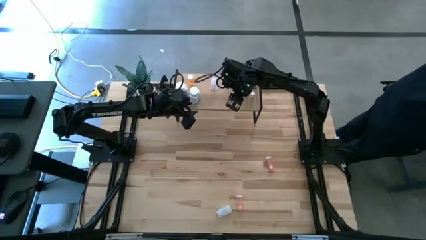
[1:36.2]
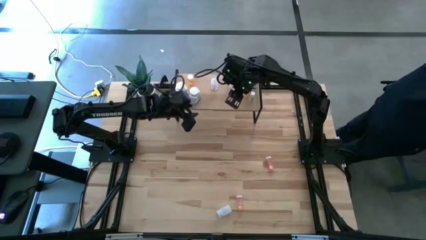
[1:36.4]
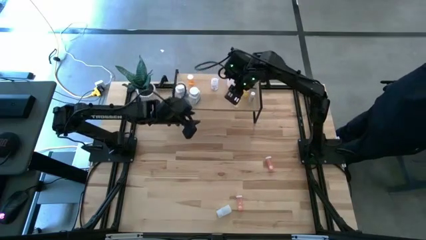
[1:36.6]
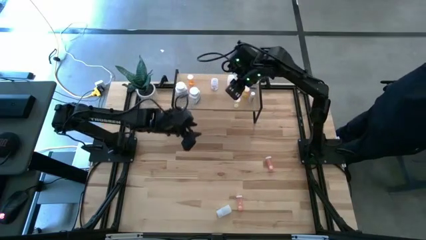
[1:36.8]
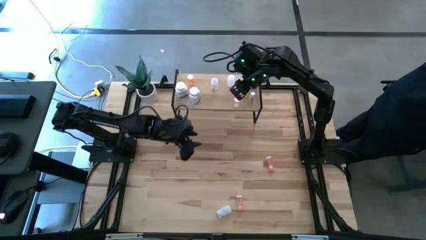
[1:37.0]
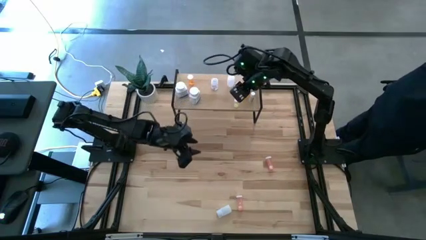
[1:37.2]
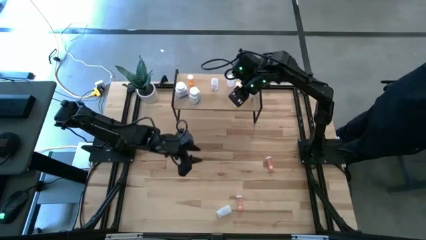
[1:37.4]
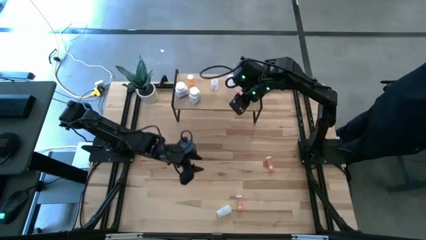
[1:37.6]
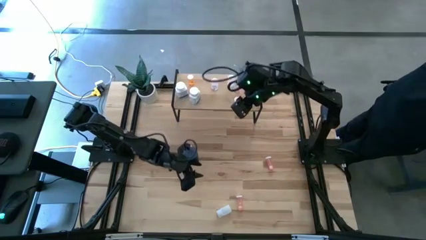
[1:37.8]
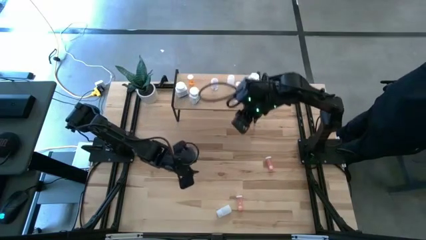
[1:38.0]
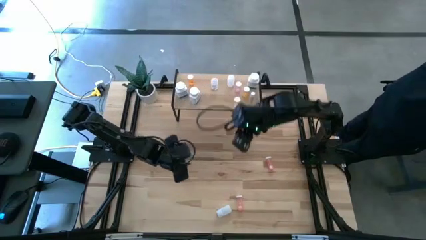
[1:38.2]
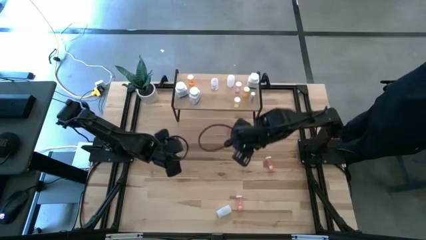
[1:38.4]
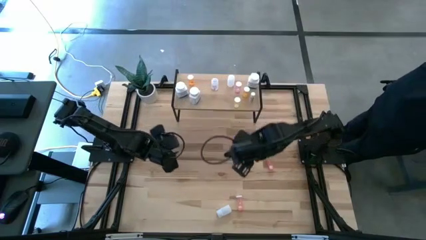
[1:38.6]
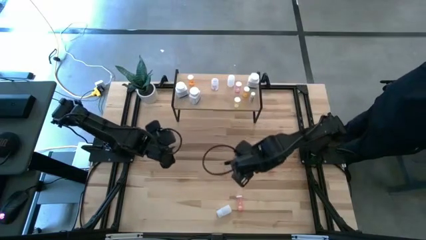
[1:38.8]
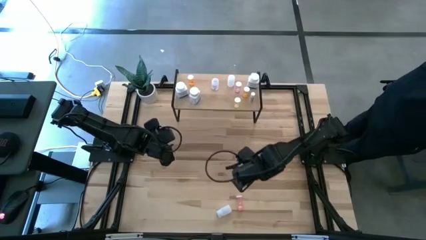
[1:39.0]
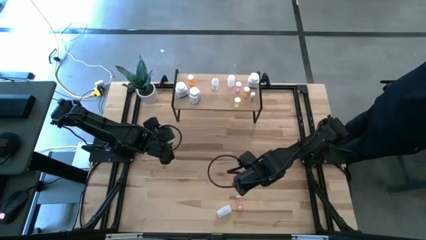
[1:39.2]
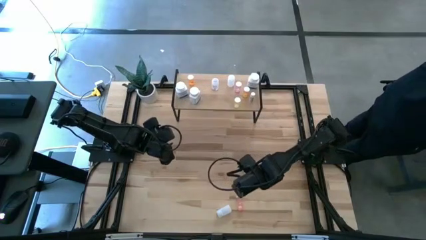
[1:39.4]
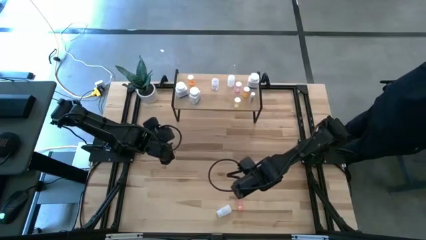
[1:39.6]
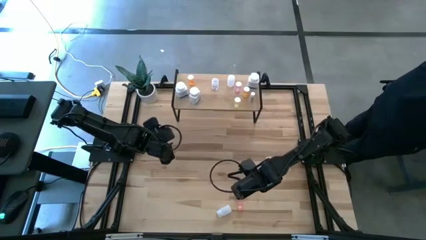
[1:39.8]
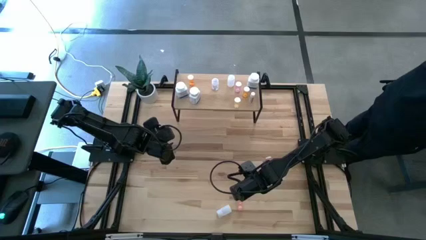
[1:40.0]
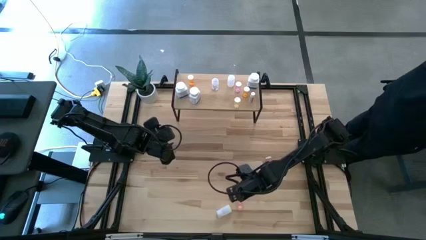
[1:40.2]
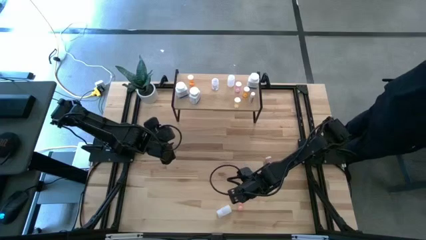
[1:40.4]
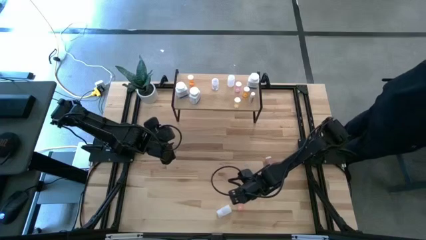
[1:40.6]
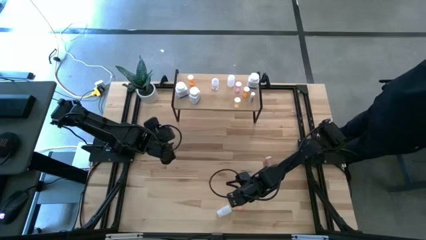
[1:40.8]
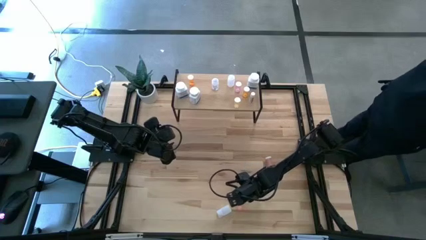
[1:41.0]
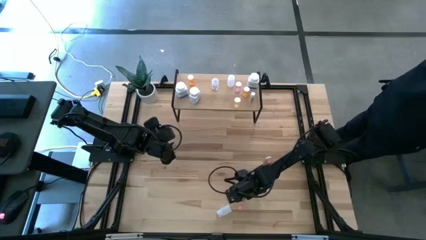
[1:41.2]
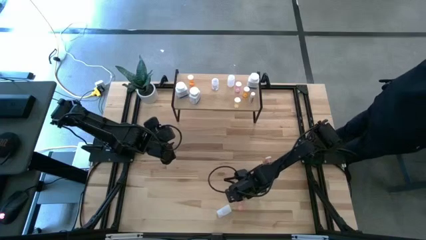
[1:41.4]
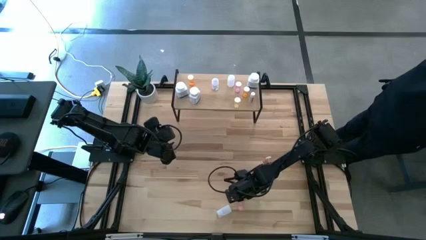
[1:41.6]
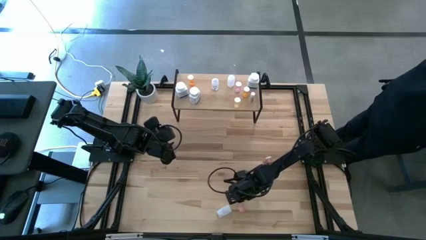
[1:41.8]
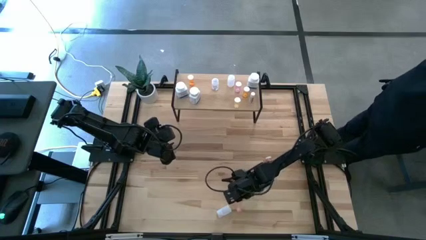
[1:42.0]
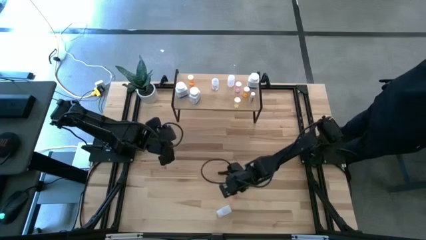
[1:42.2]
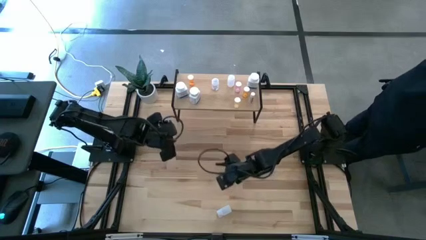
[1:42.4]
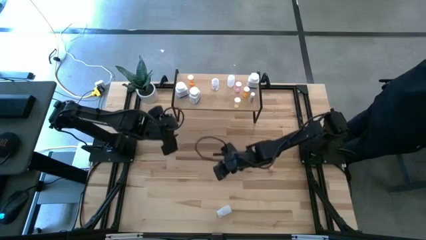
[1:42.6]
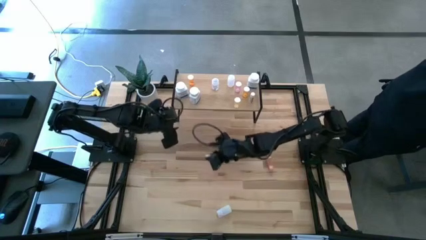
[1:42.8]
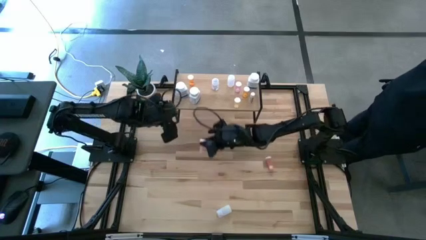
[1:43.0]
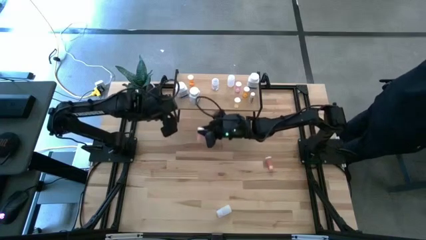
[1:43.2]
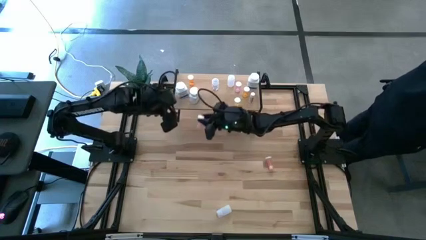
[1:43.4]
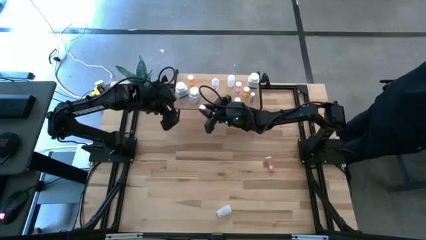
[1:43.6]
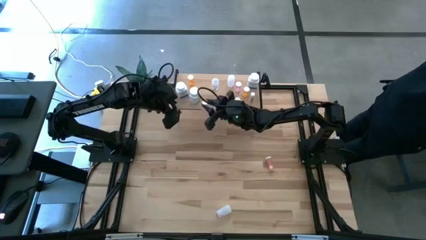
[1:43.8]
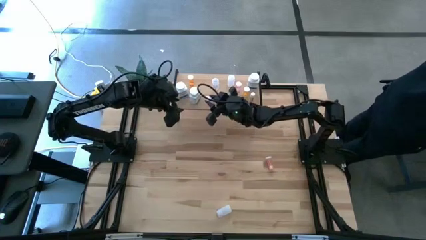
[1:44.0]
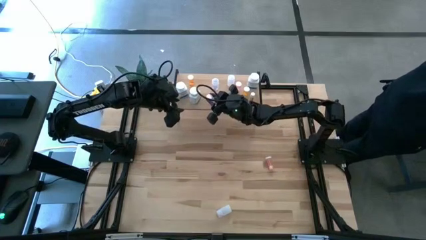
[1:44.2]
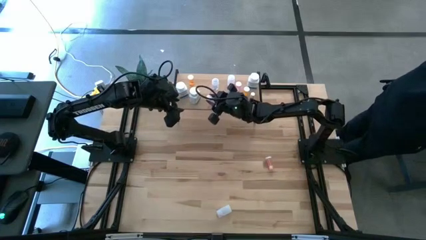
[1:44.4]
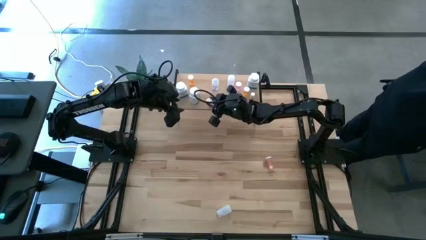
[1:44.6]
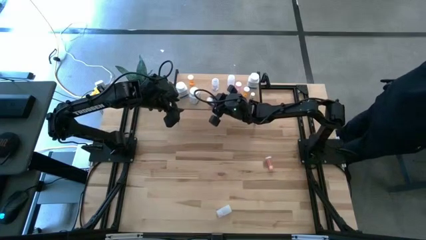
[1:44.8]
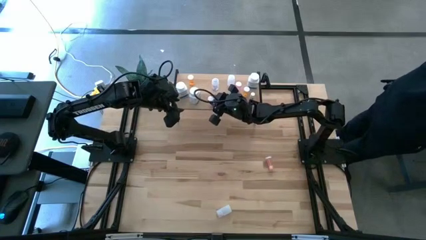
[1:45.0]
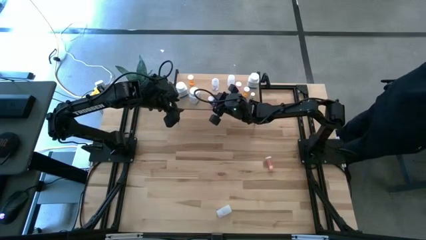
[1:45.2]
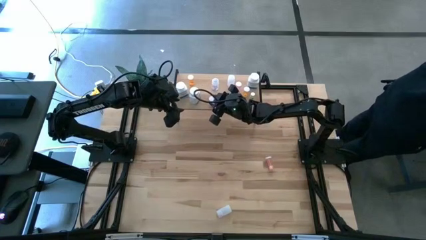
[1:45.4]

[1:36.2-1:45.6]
Task: Pick and place medicine bottles onto shelf by color
Put the bottom pink pill bottle on the shelf

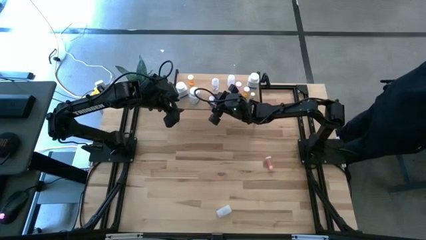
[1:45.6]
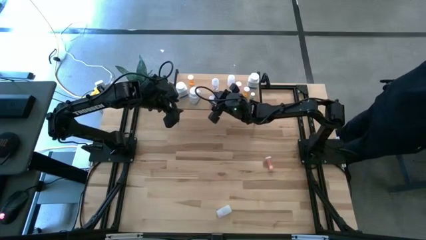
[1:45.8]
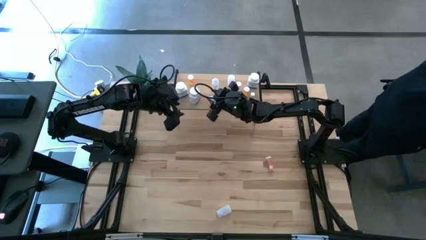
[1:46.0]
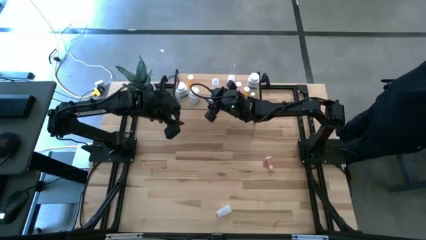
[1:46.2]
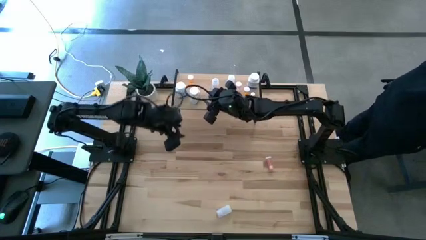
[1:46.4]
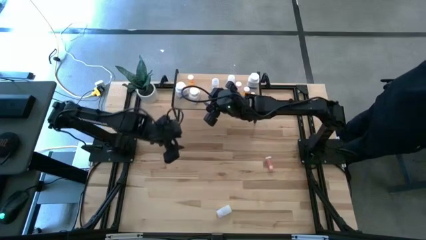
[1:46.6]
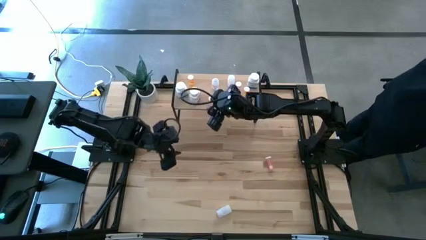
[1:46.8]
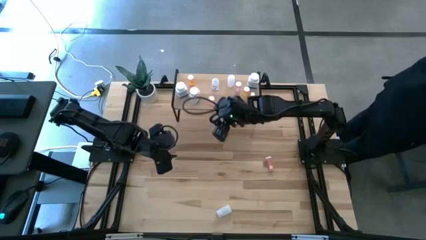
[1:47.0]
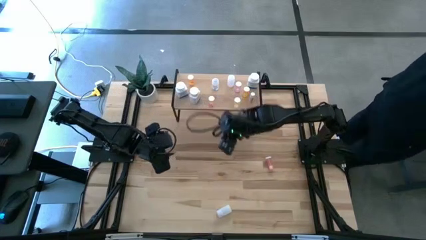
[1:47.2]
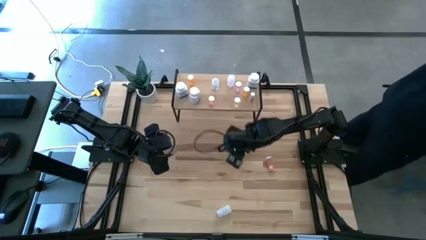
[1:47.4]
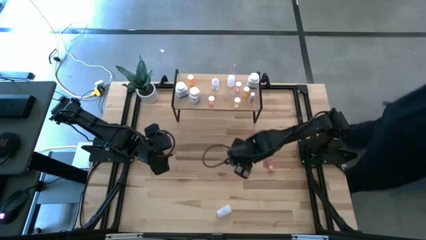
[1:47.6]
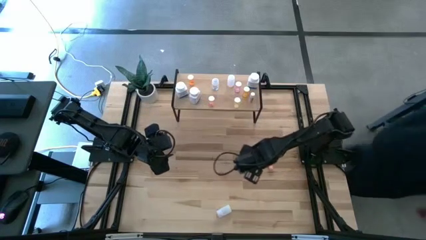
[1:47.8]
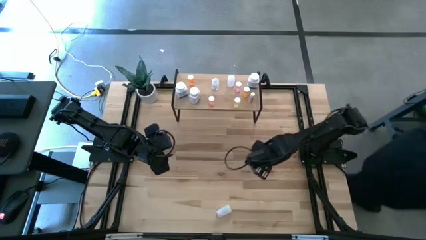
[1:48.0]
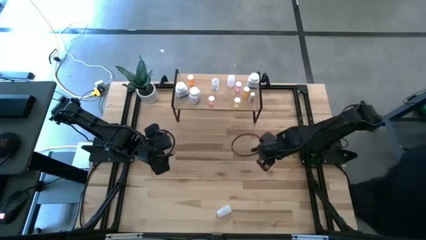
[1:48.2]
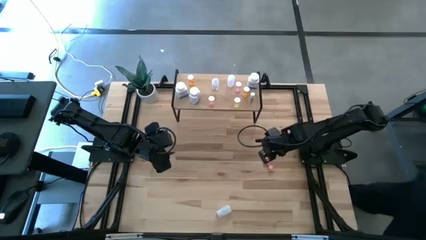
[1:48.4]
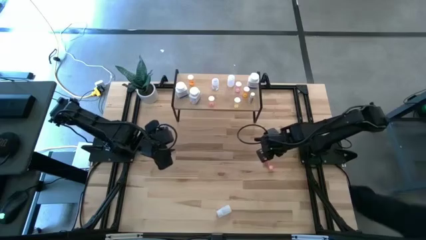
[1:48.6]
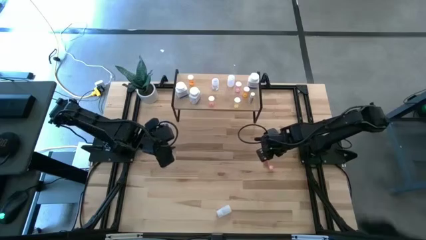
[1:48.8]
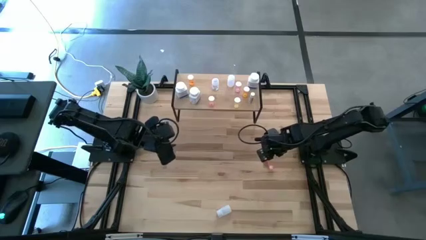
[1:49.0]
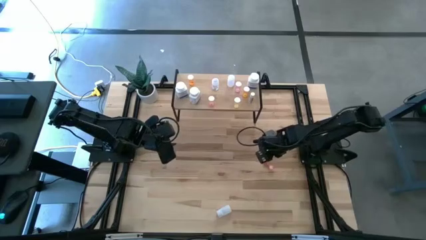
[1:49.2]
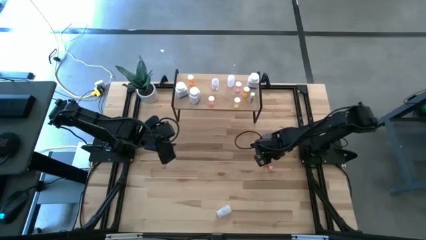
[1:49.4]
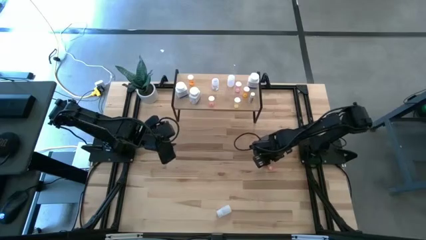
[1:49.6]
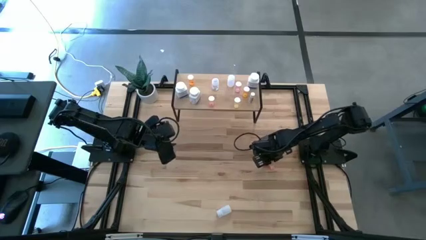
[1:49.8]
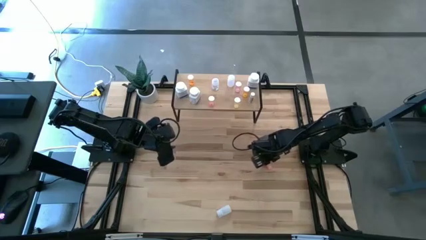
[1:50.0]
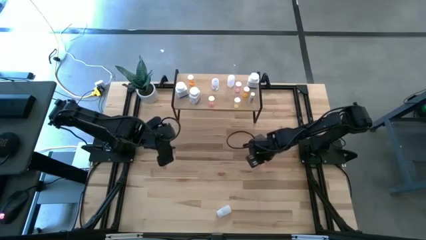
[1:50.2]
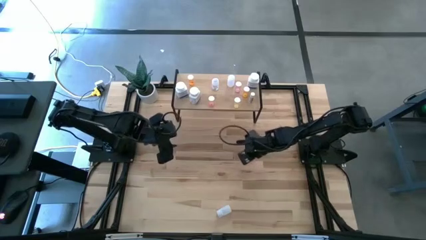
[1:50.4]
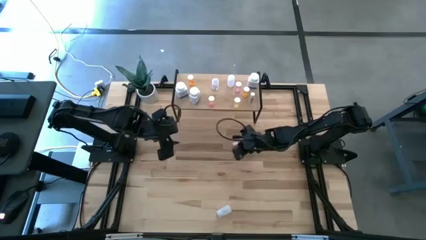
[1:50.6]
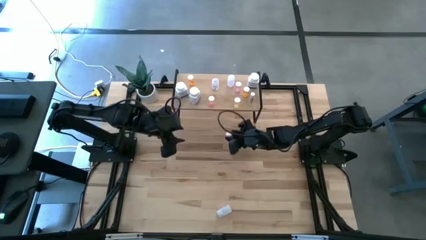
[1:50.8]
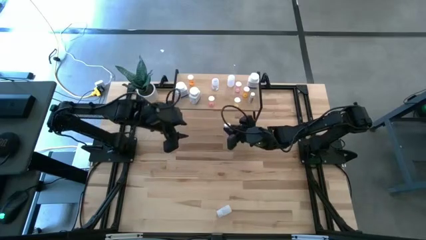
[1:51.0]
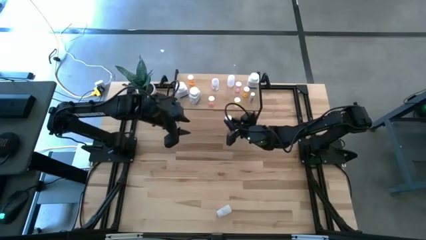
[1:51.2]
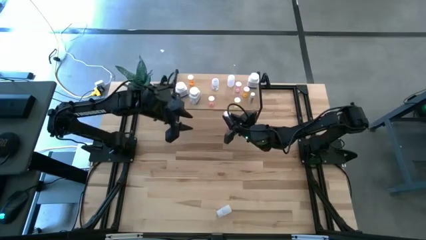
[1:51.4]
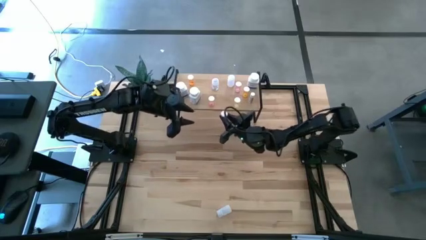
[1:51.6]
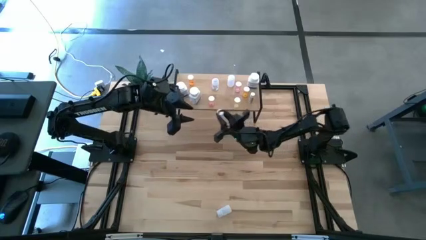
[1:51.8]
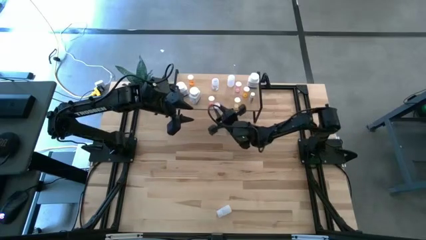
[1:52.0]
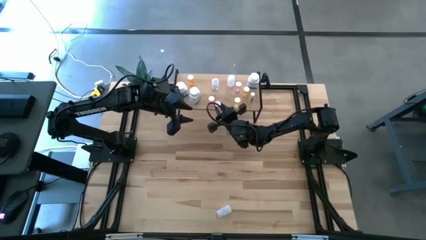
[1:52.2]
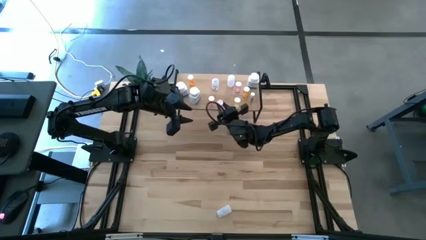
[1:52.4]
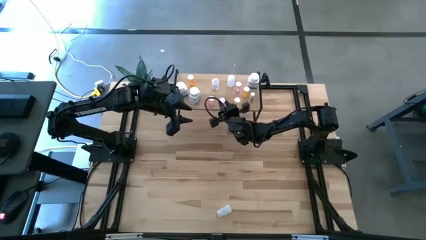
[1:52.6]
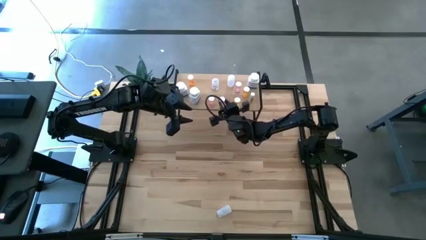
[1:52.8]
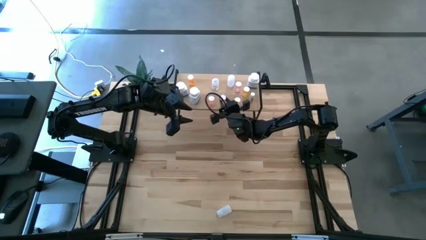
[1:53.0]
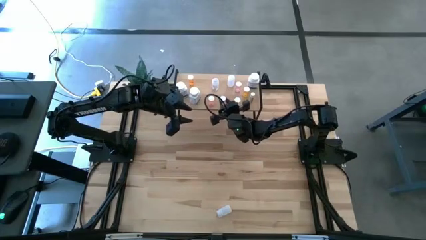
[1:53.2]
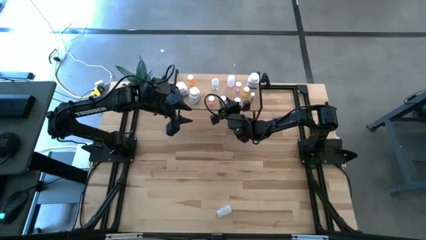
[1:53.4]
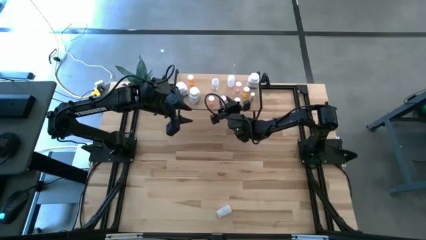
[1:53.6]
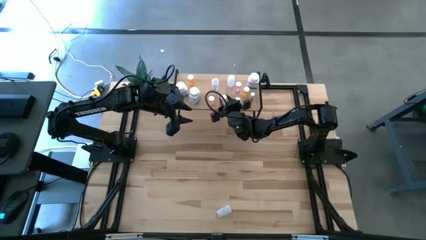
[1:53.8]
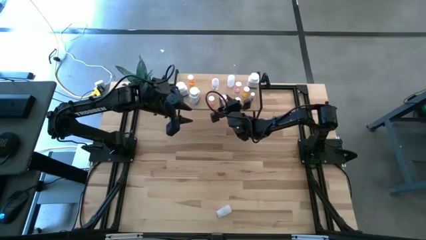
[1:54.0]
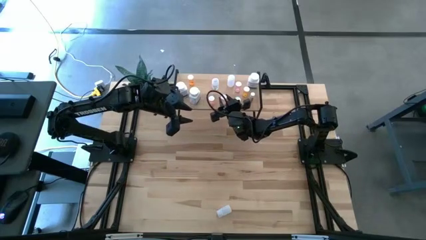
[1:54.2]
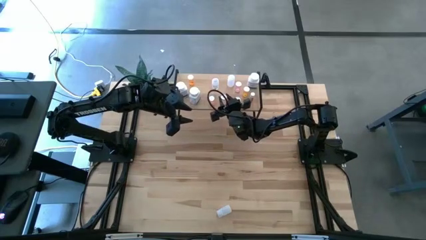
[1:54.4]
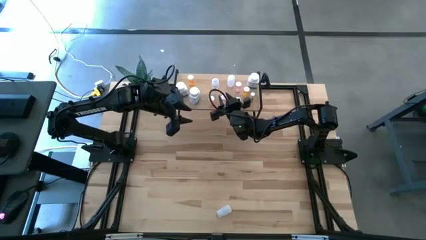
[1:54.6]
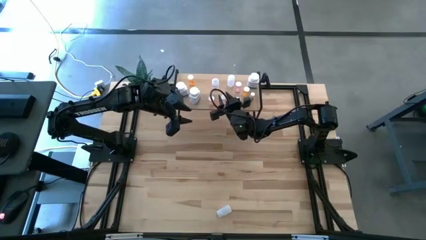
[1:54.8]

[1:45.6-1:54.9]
Put the pink pill bottle on the shelf
